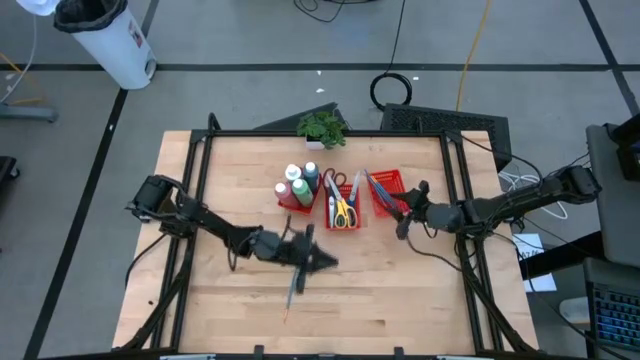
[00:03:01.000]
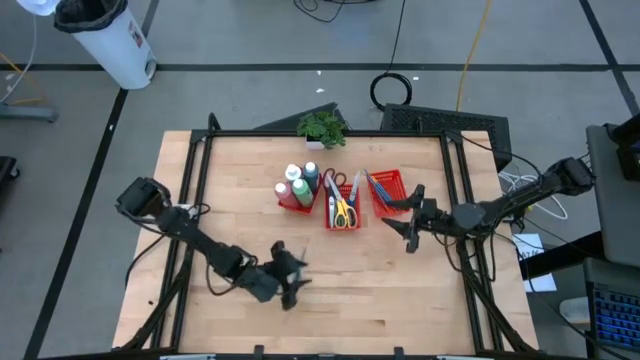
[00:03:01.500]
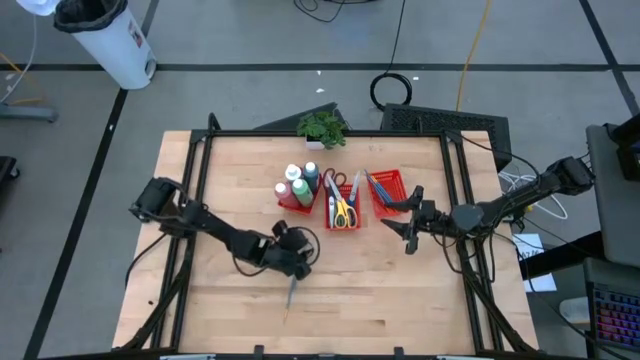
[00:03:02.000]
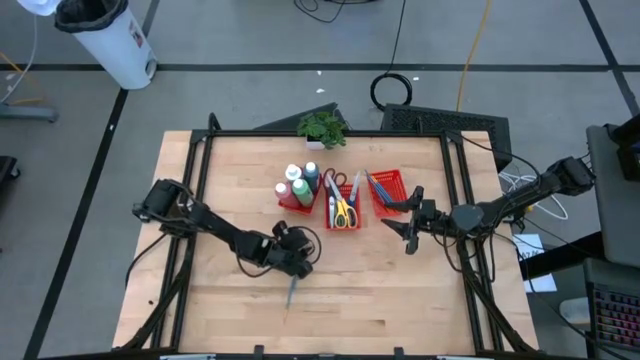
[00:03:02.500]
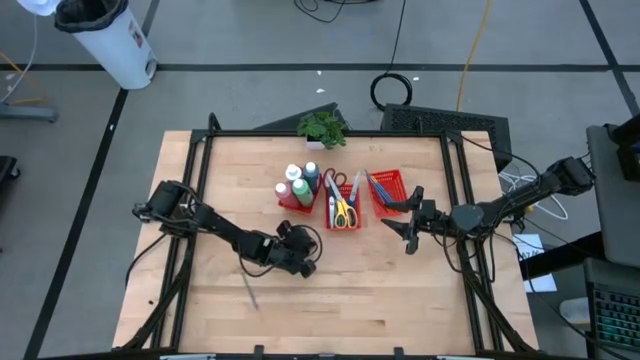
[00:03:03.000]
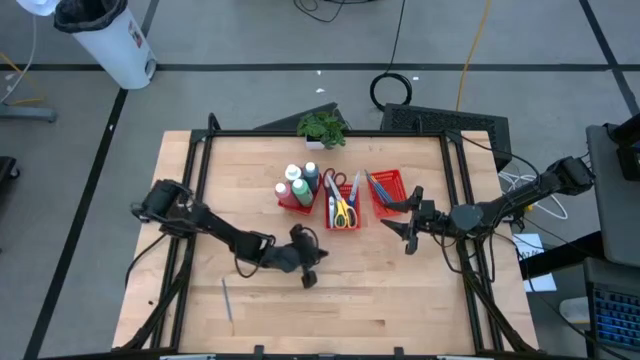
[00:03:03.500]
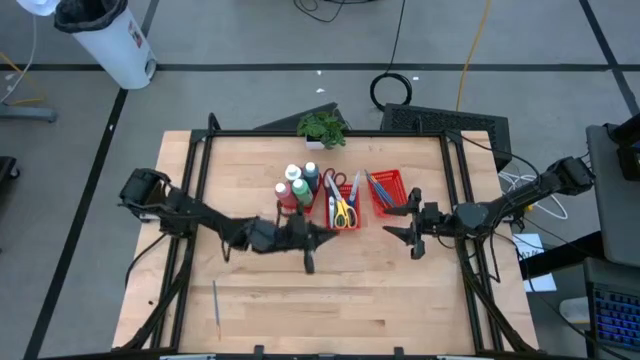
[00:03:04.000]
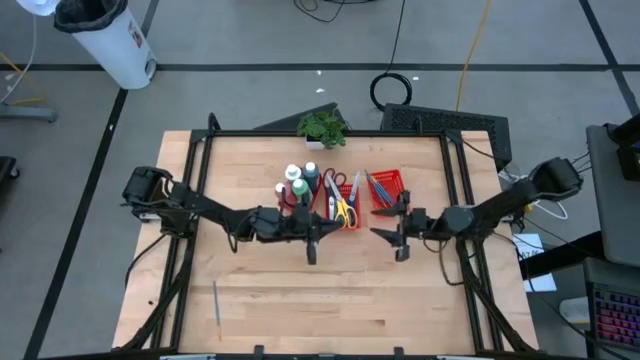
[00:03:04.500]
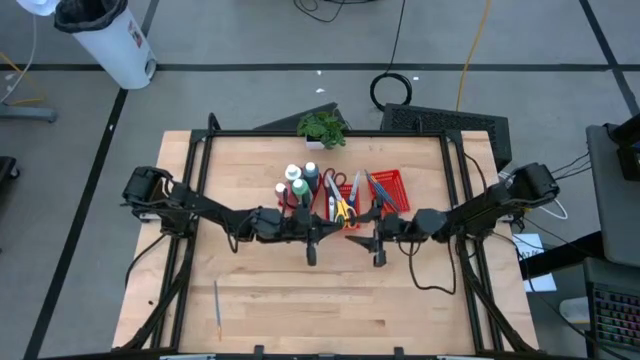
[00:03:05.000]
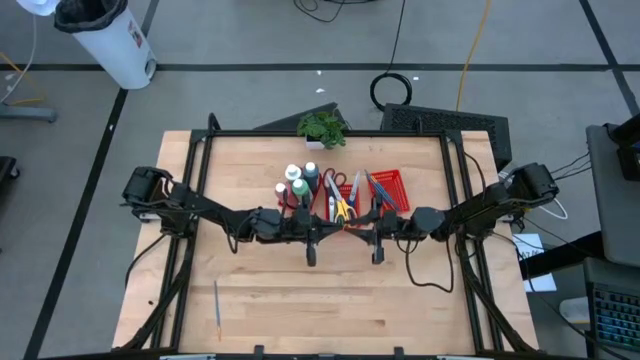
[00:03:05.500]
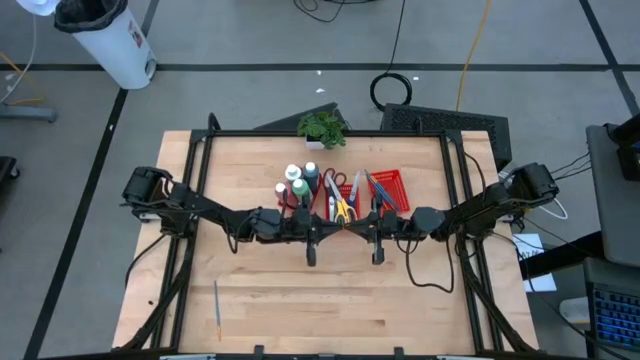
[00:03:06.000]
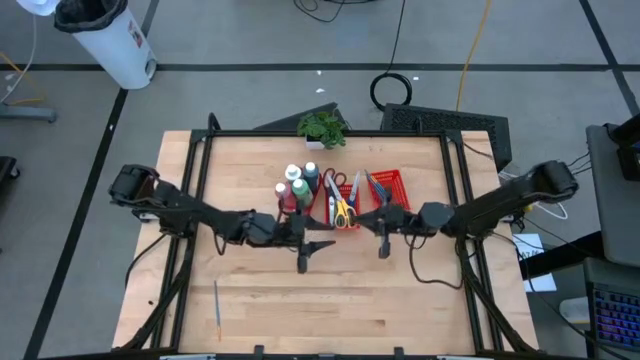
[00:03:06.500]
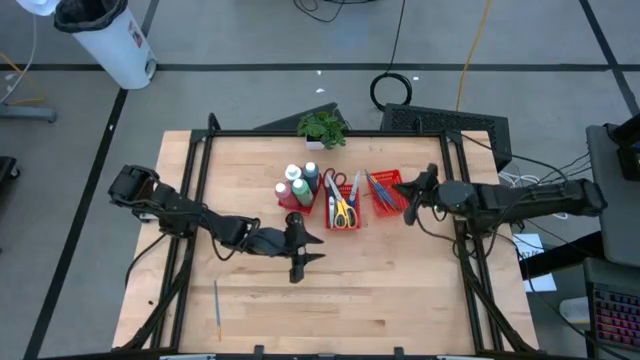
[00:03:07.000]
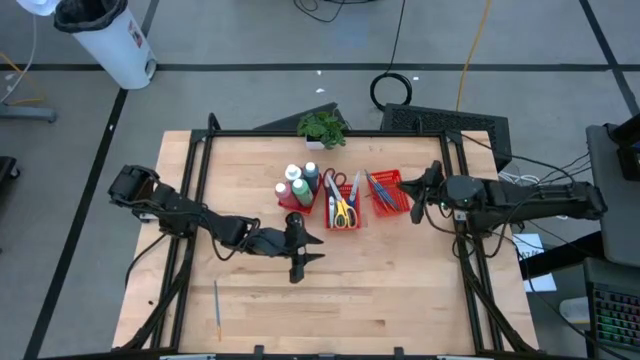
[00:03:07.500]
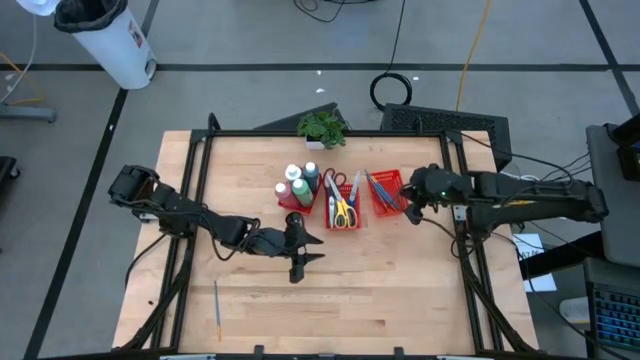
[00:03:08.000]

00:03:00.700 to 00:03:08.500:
Task: Pick & Place Paint Supplies
Put the blue paint brush into the right red bin

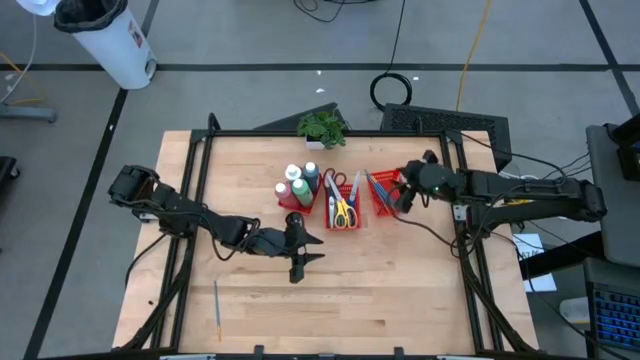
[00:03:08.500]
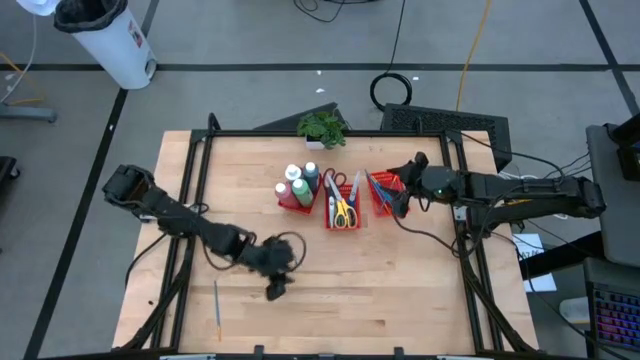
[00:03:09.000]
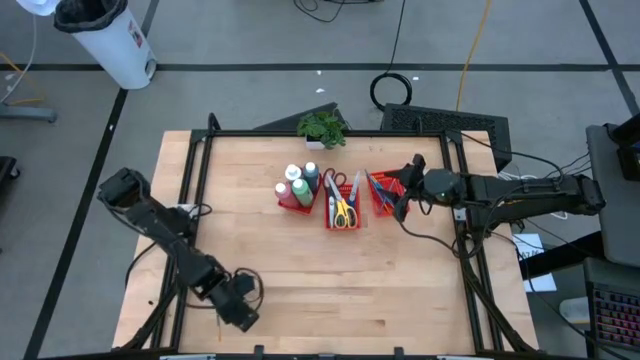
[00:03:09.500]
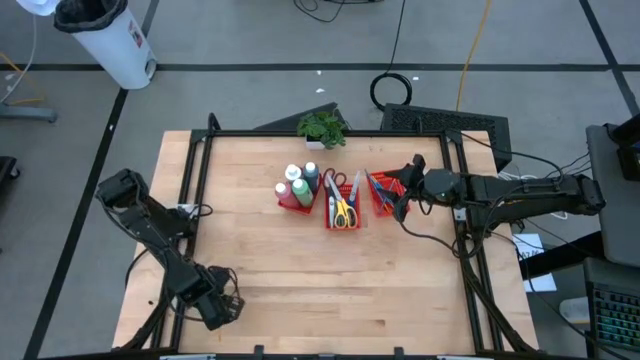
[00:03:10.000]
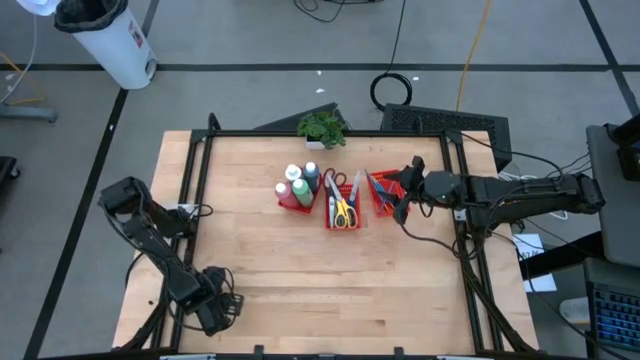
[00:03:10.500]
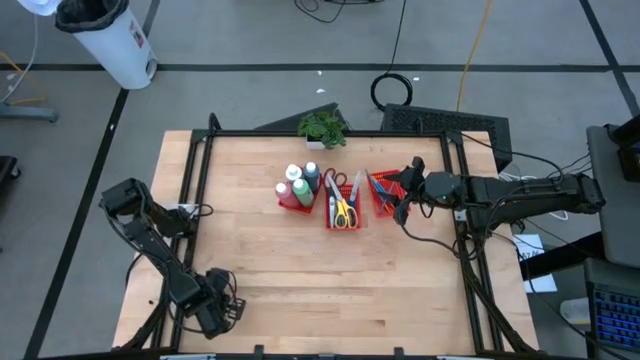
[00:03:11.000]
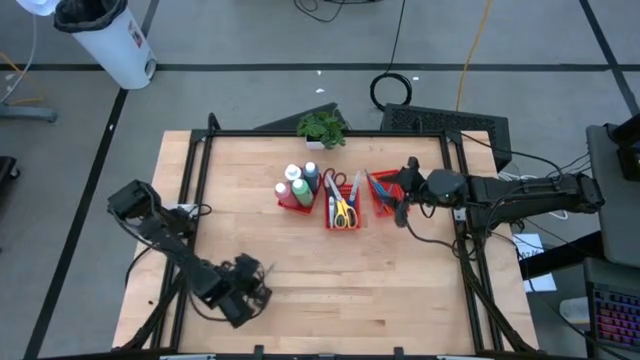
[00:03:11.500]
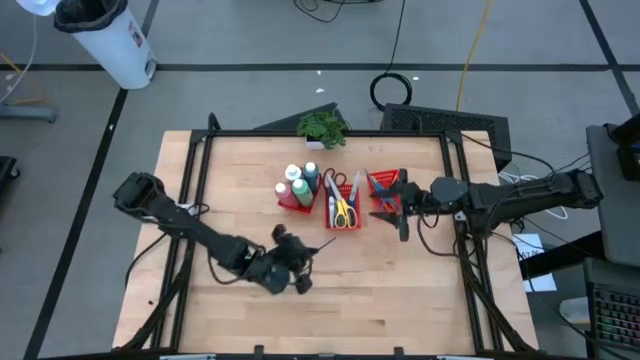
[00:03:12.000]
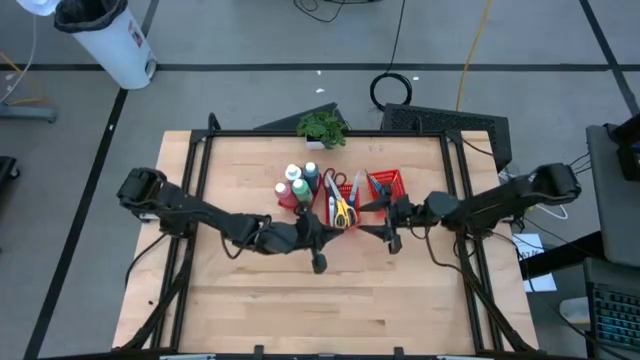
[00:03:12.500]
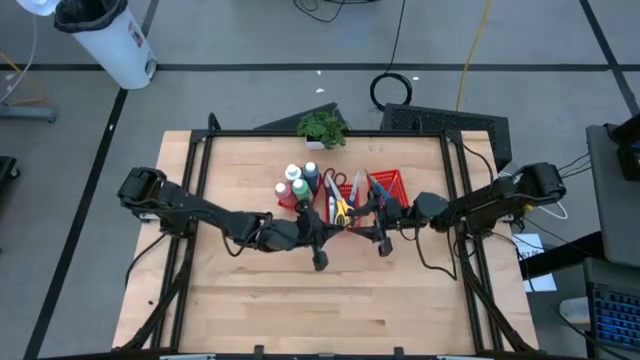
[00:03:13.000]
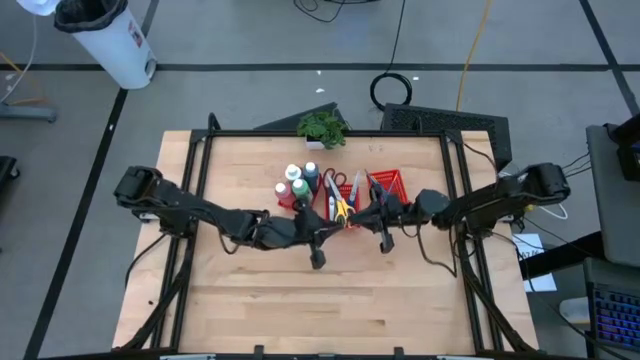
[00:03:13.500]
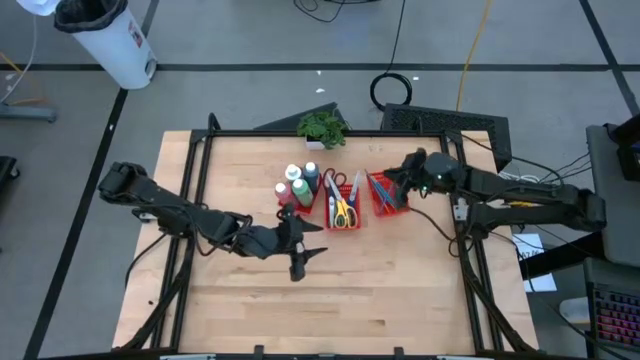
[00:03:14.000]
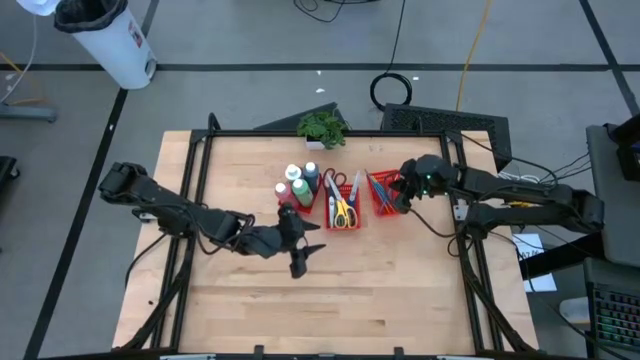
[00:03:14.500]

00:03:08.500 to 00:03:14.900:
Put the blue paint brush into the right red bin

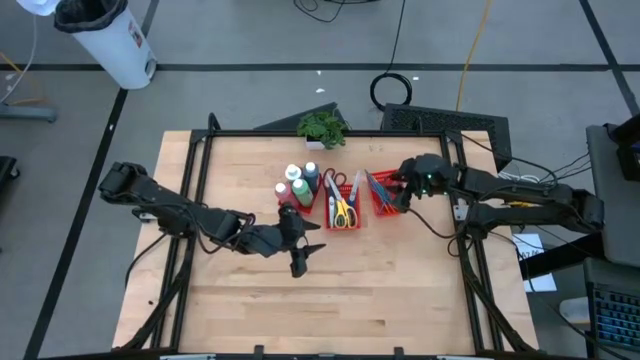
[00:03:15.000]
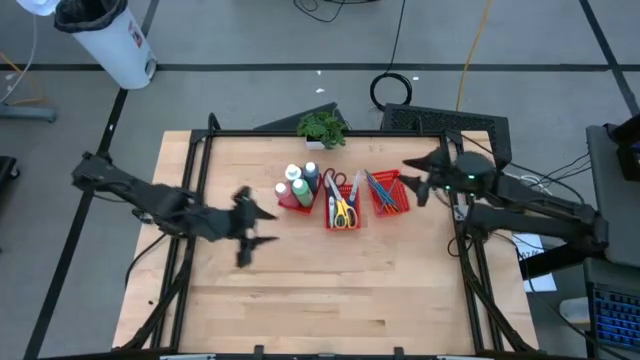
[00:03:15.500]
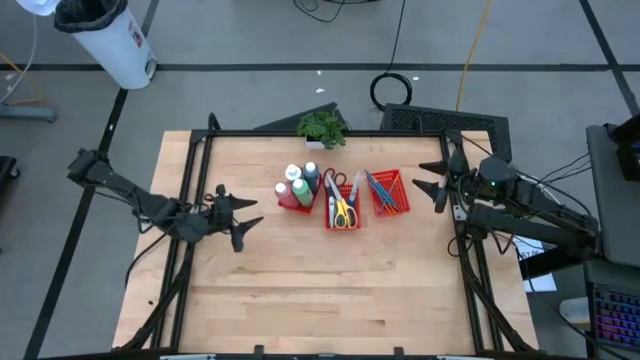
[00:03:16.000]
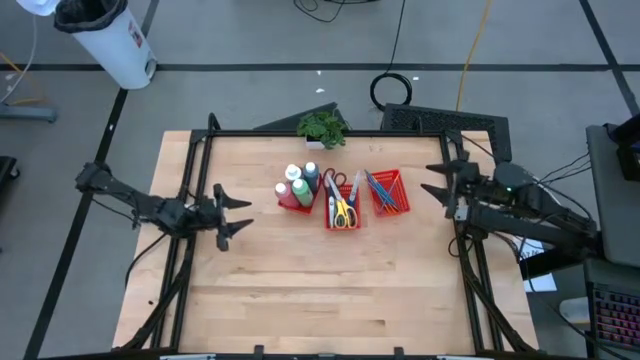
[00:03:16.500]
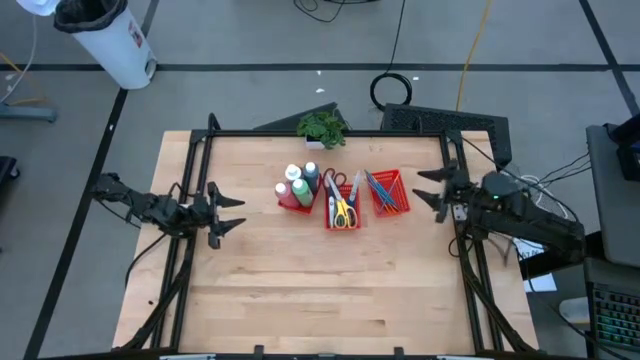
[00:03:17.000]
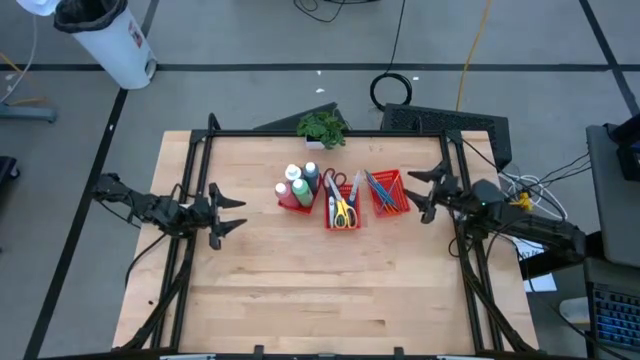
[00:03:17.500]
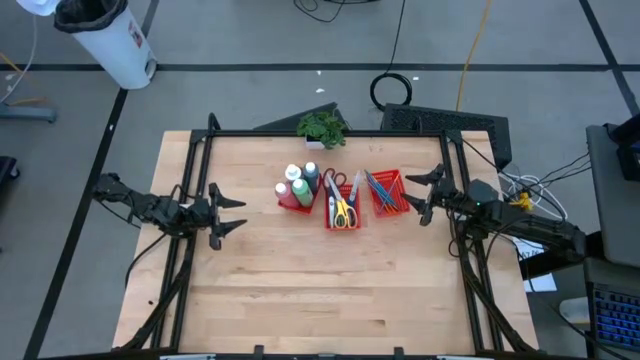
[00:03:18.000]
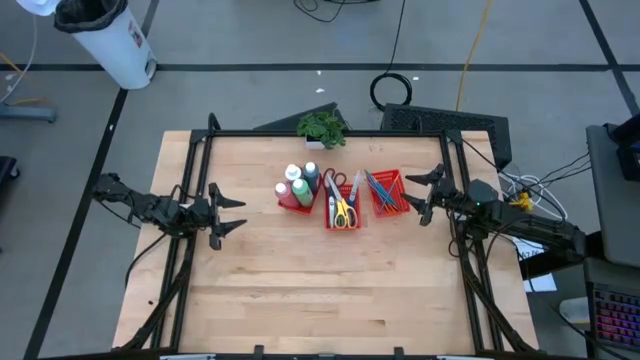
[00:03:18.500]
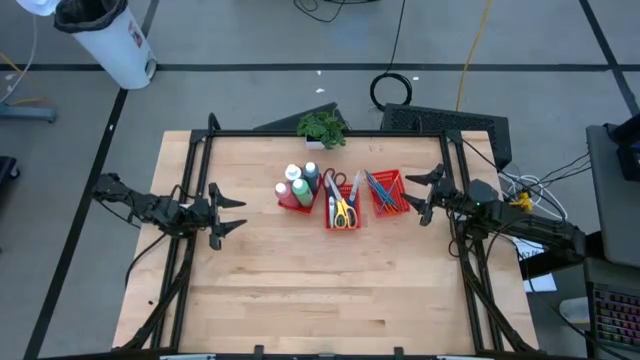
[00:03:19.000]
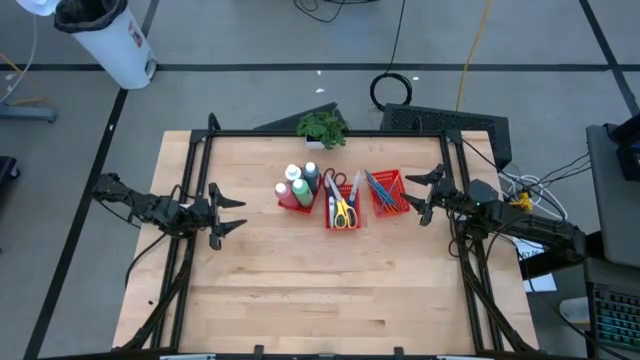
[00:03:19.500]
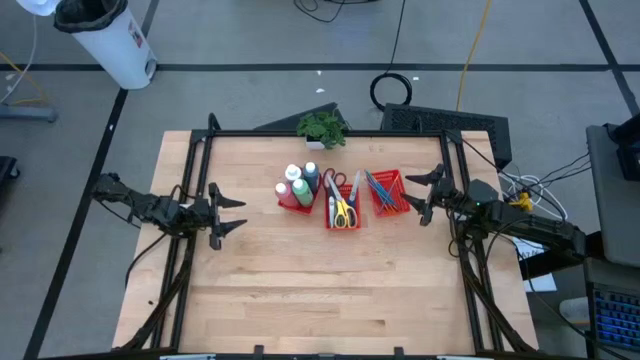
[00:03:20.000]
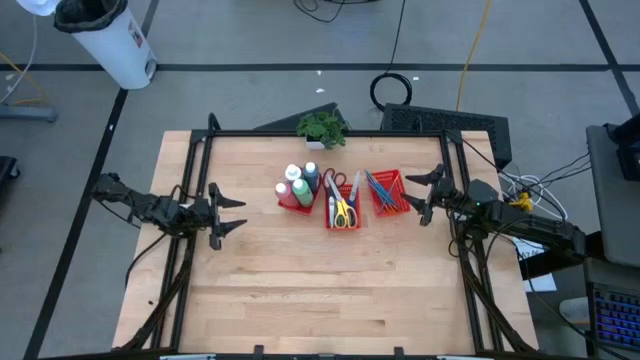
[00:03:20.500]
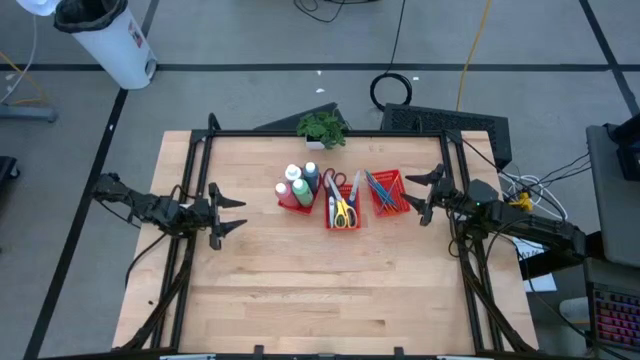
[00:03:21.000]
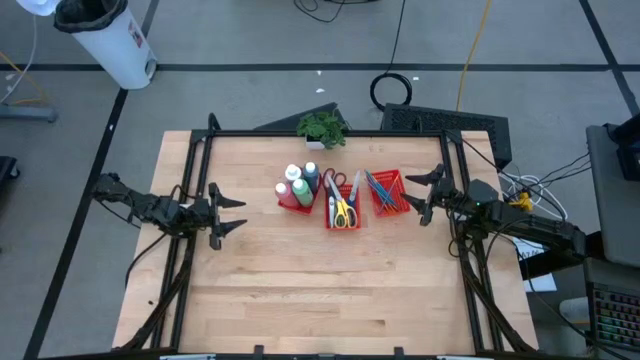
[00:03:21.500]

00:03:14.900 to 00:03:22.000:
Return to Home Position
